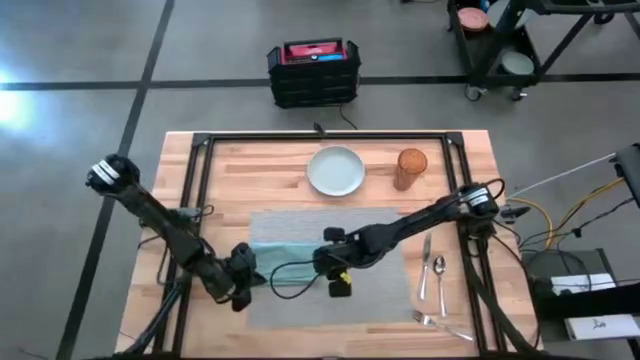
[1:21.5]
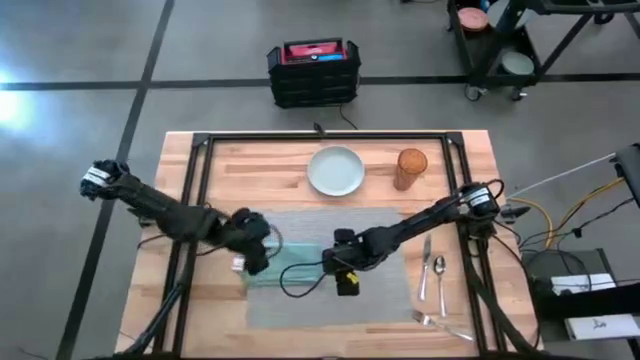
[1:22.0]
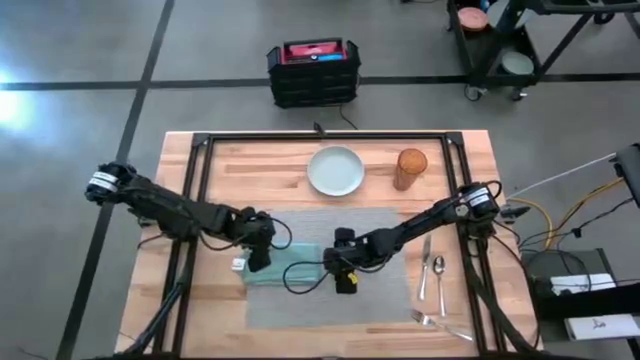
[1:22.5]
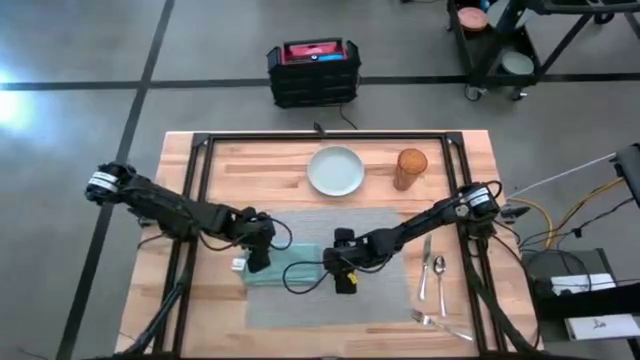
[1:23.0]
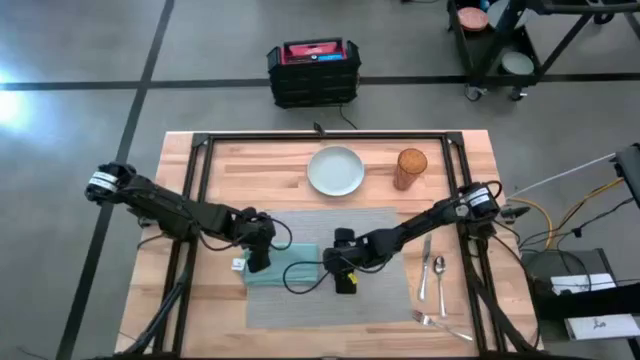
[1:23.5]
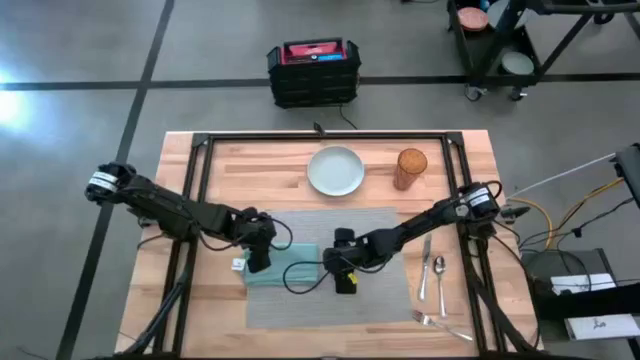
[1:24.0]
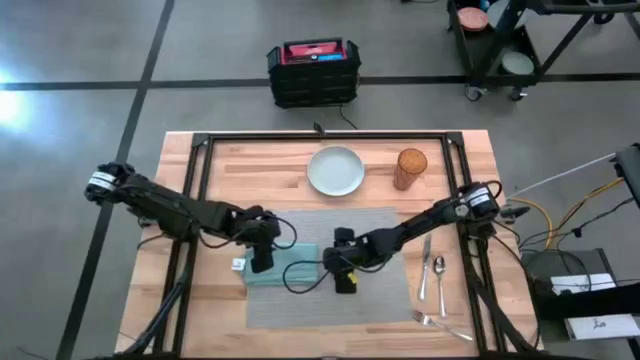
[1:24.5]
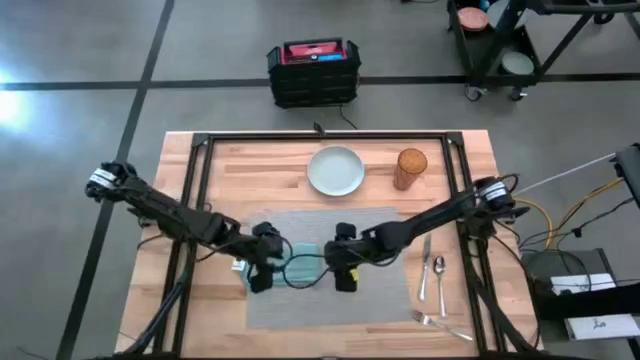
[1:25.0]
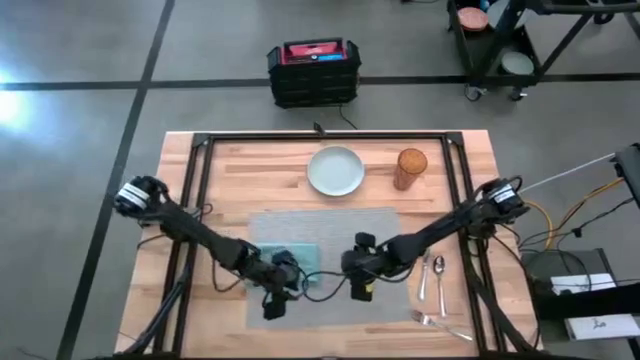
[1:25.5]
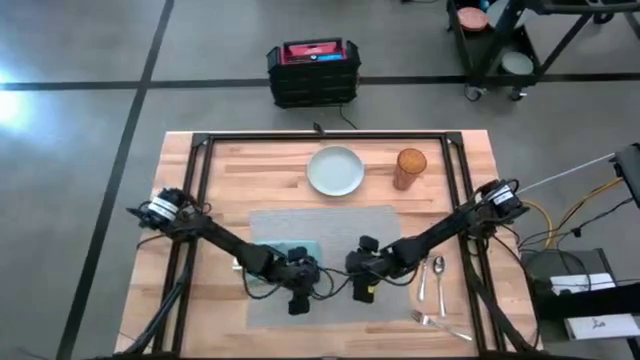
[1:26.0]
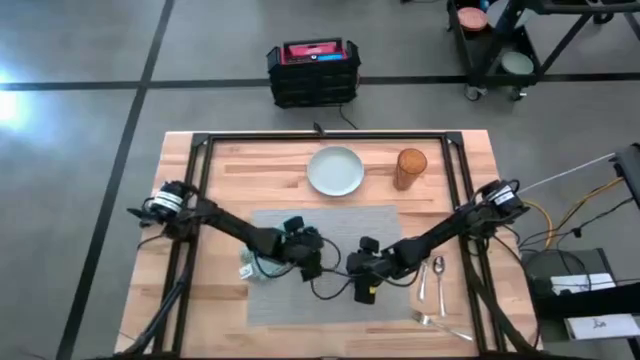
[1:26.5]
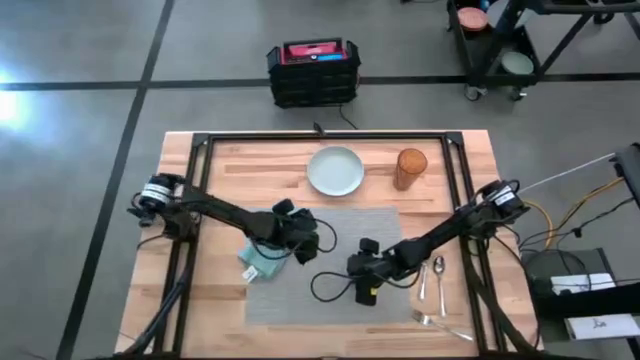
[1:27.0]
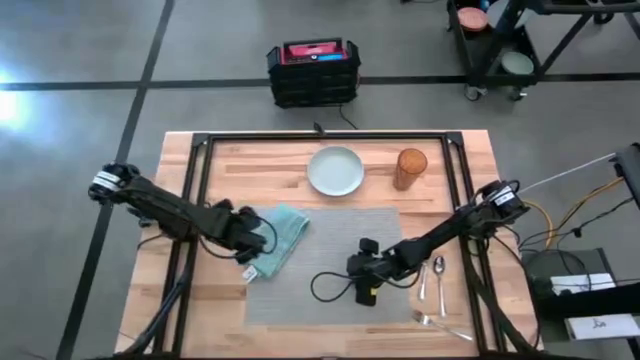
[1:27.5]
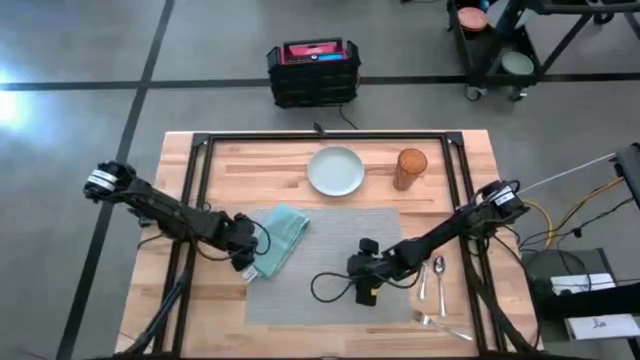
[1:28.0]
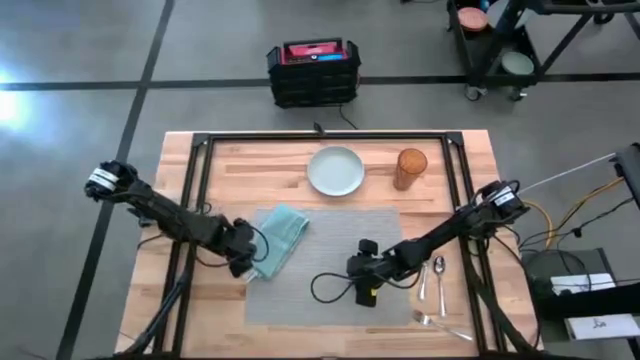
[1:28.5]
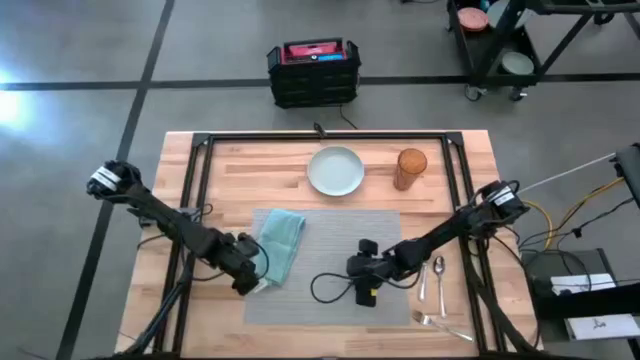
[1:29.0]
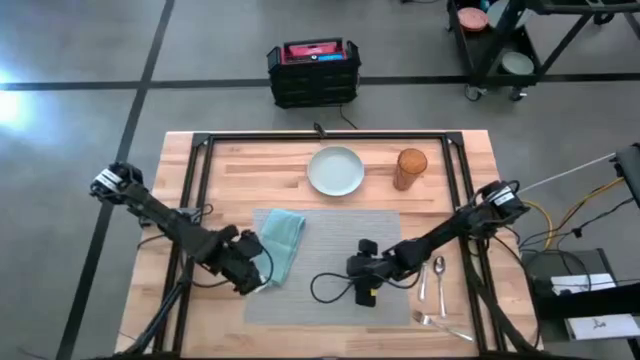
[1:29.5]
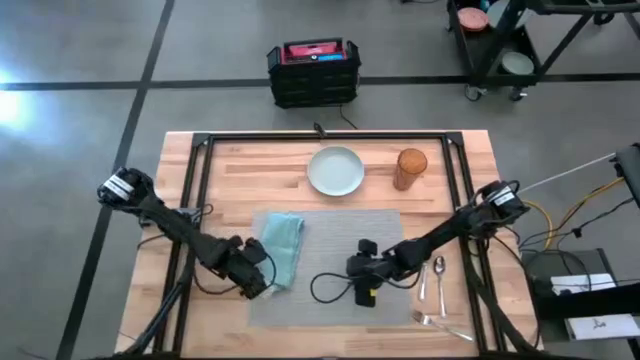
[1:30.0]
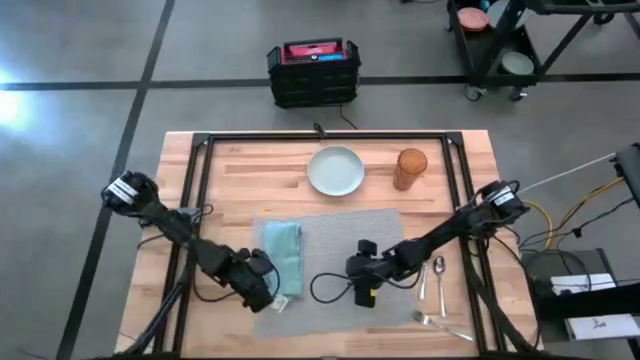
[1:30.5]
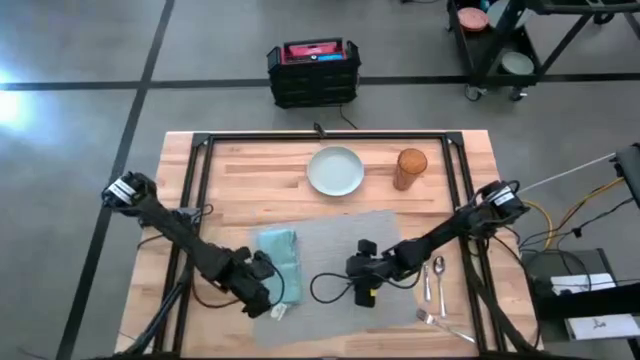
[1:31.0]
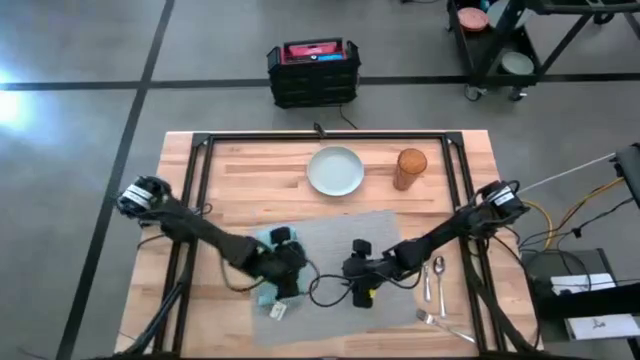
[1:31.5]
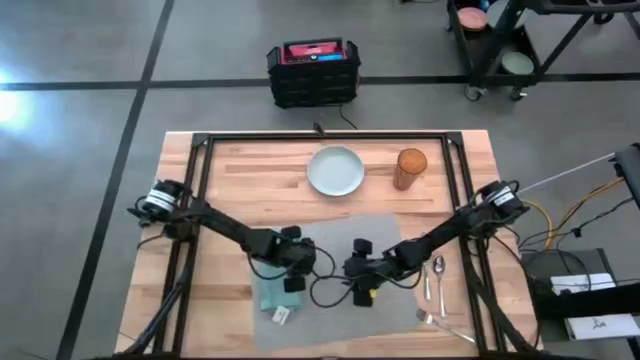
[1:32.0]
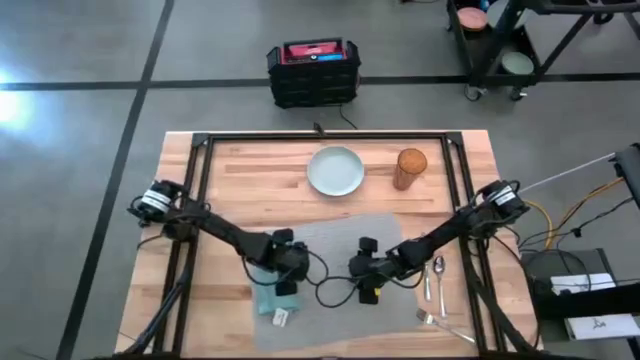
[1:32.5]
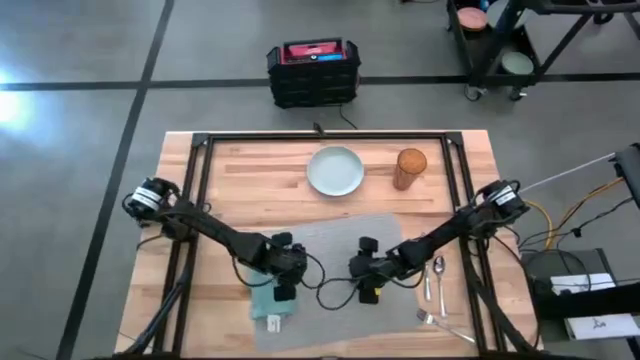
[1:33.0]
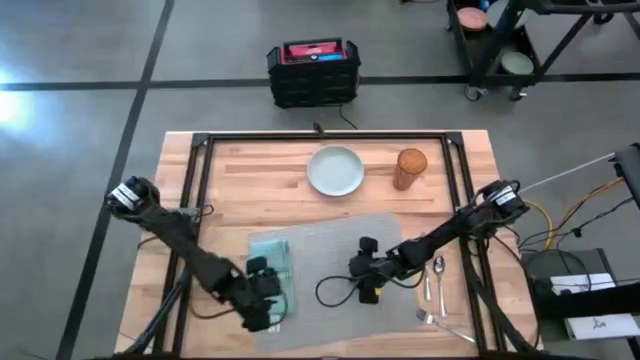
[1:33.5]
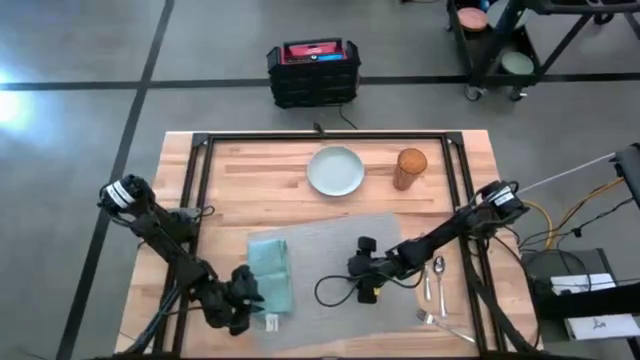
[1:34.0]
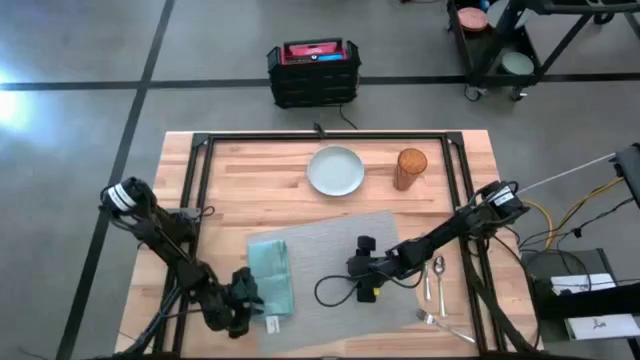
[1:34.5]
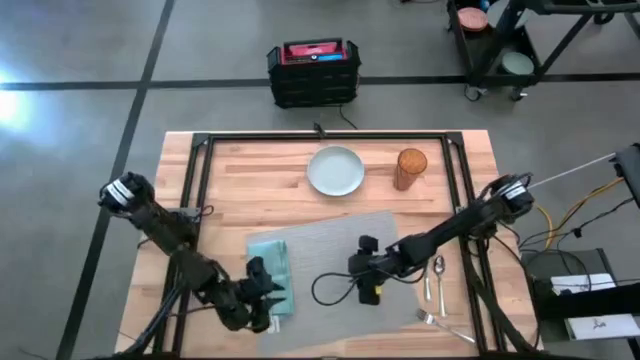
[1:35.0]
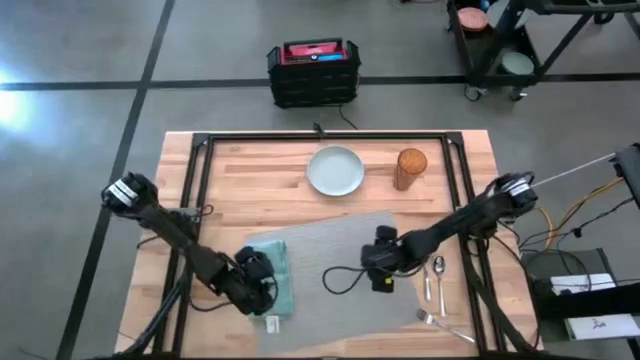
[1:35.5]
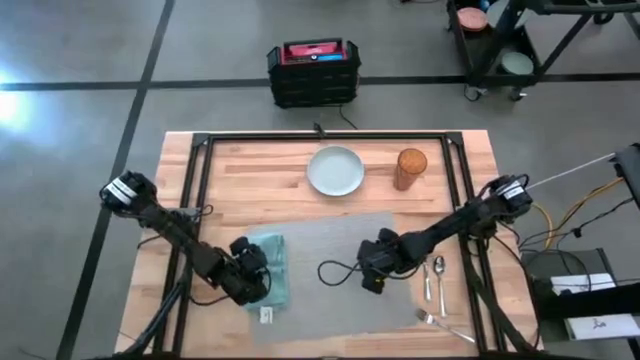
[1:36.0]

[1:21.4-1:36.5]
Task: Set table place
Adjust the table napkin and the table mat

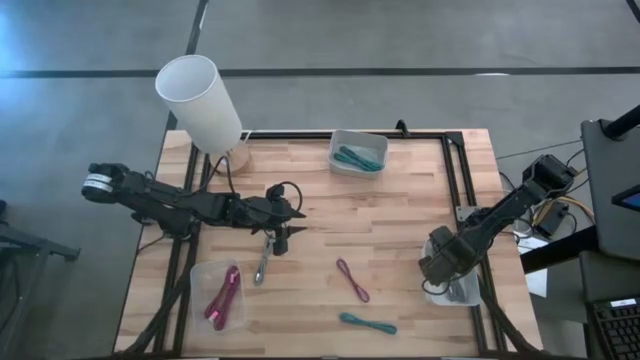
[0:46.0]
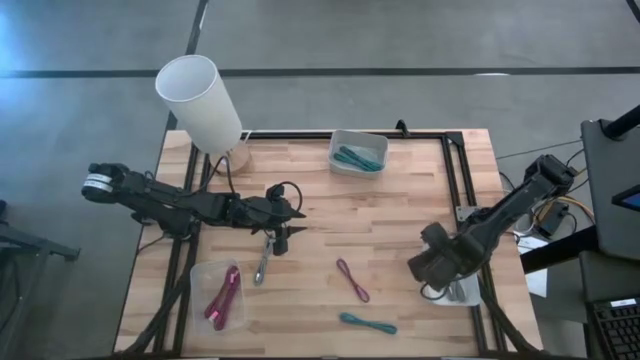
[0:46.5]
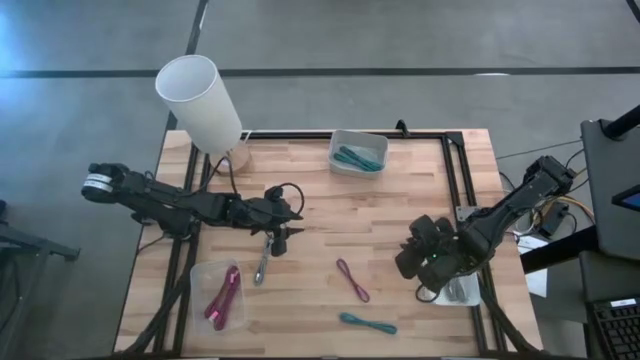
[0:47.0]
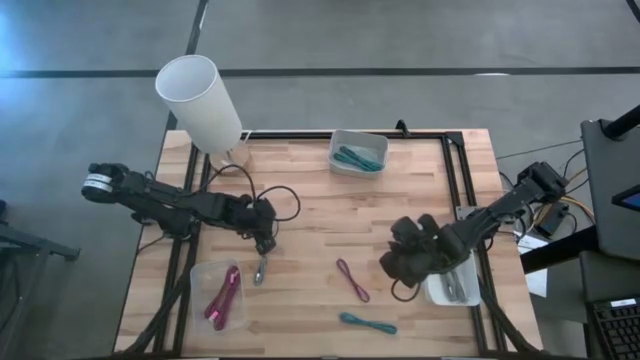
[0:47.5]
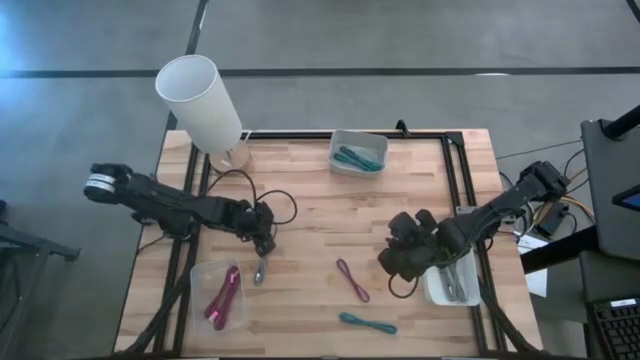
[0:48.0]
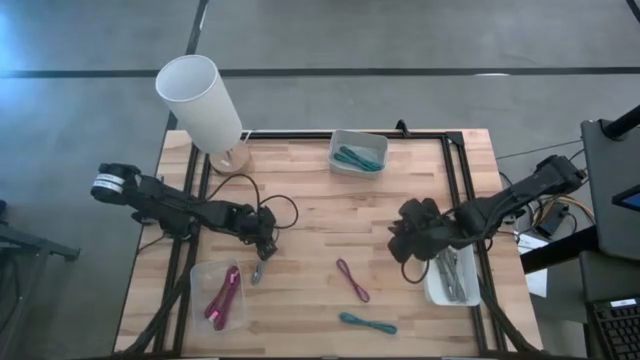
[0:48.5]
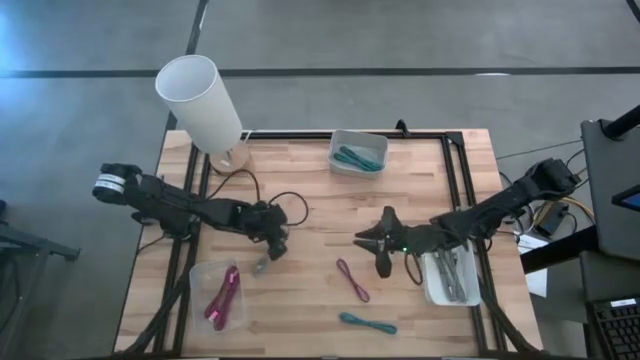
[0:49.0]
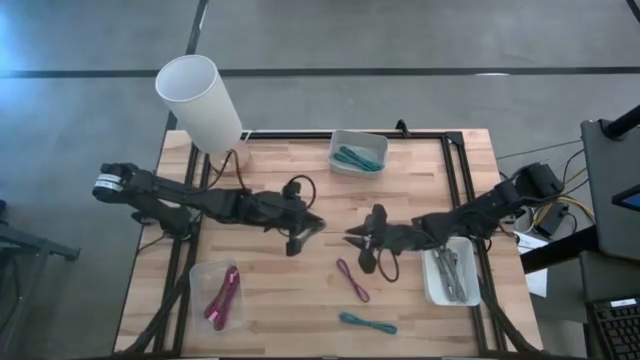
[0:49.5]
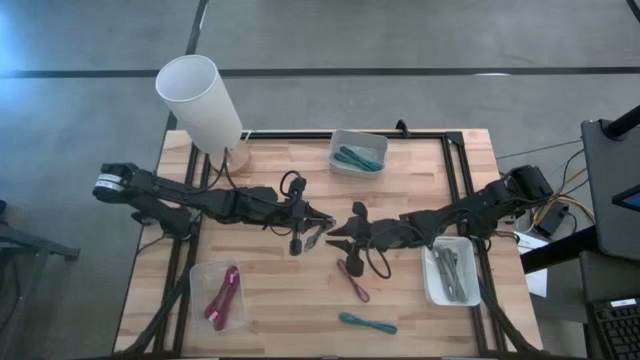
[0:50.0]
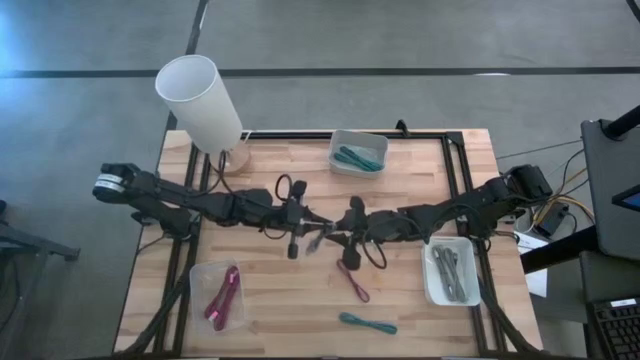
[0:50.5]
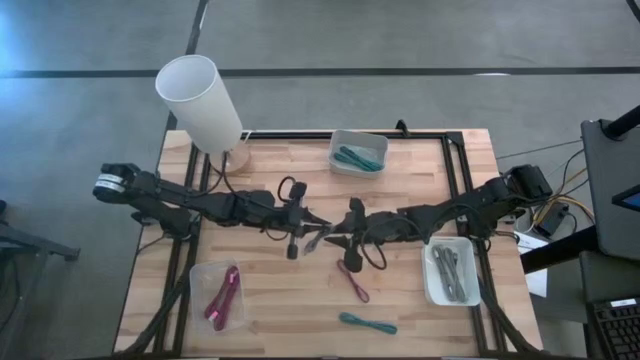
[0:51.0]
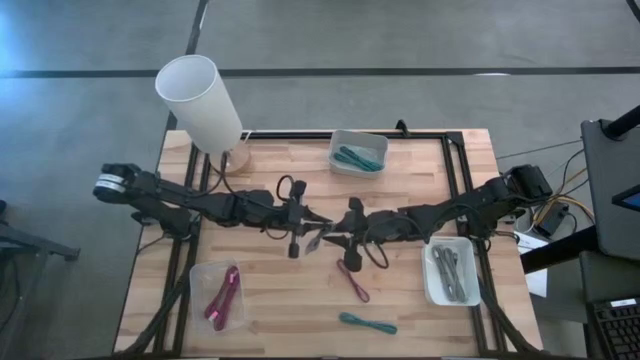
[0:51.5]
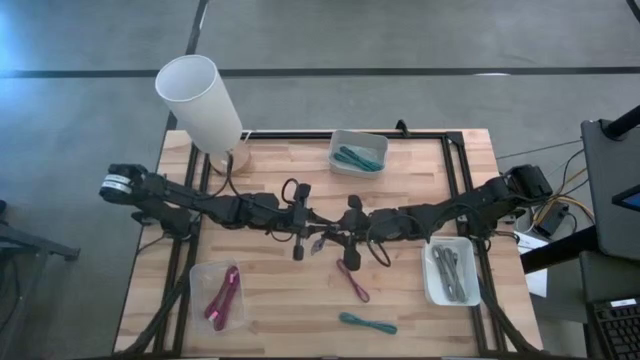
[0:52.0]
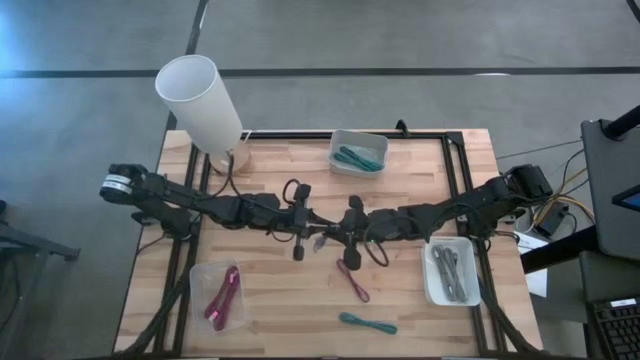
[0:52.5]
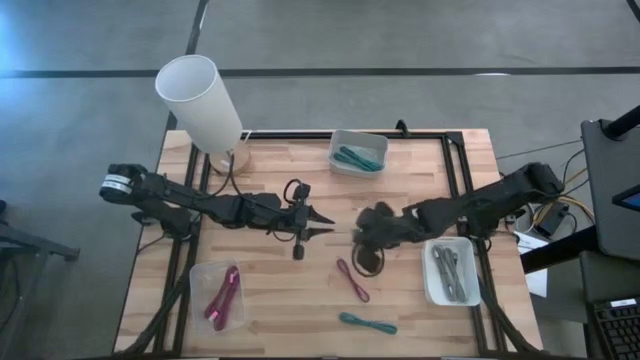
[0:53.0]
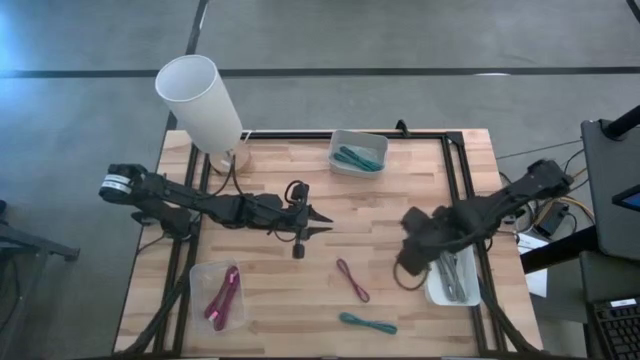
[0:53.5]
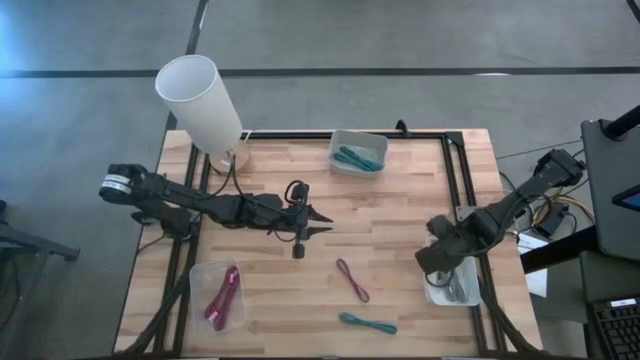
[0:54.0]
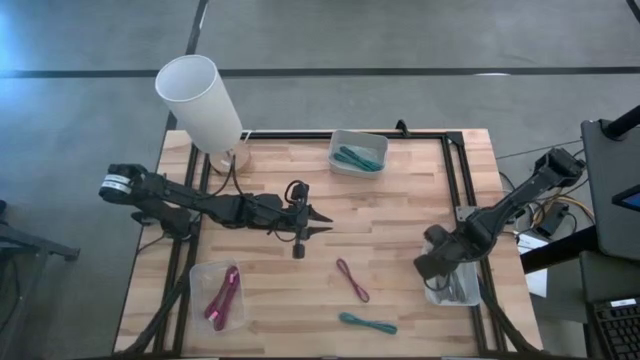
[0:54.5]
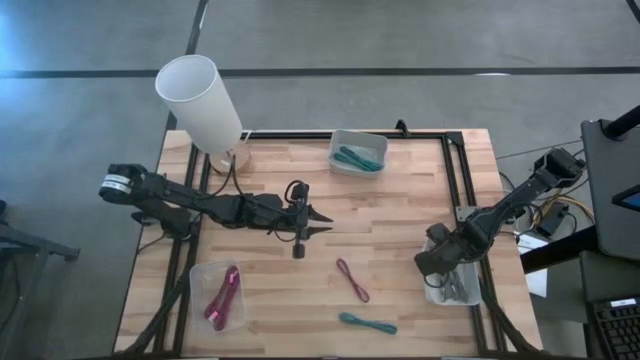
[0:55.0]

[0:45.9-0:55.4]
Task: Pick & Place USB Port
Put the white striped charger cable into the white striped bin
